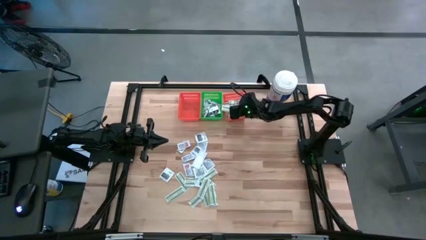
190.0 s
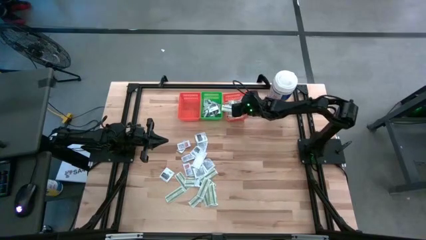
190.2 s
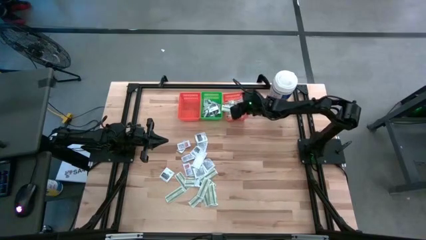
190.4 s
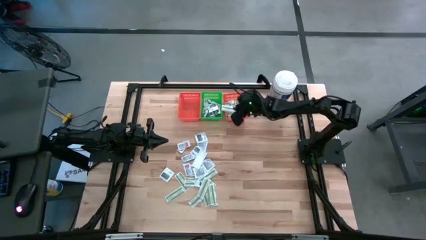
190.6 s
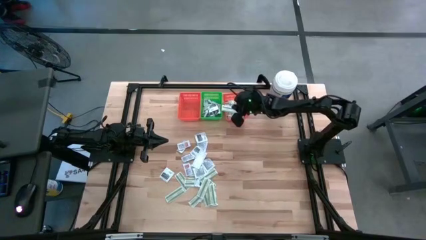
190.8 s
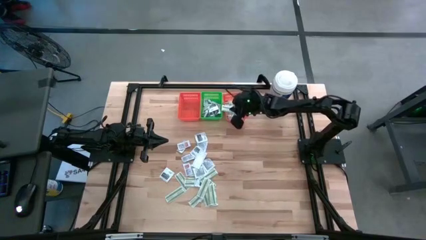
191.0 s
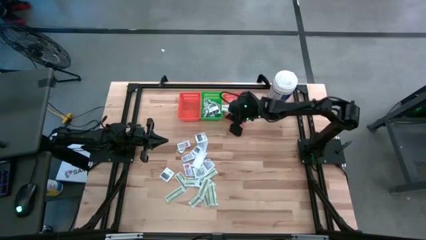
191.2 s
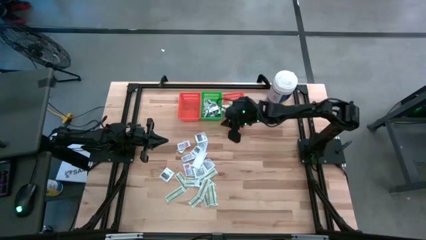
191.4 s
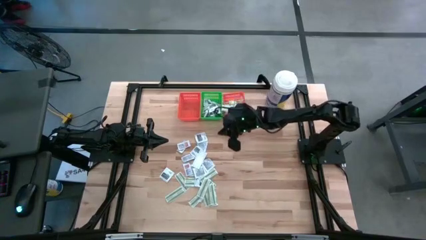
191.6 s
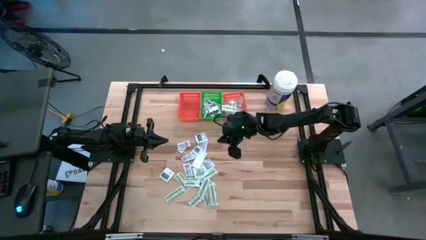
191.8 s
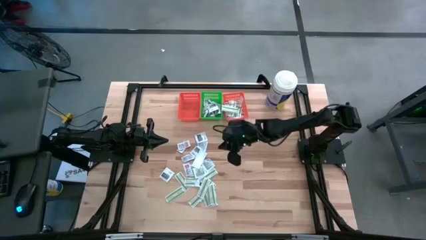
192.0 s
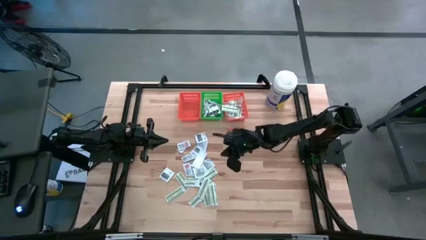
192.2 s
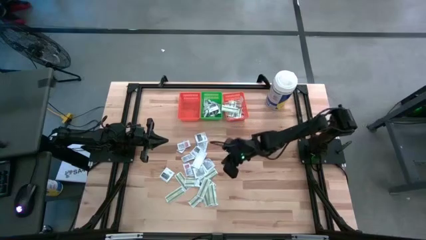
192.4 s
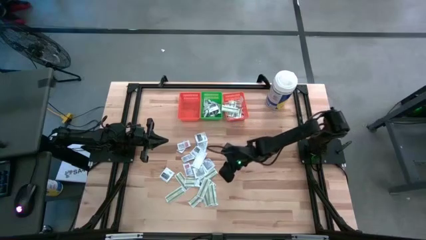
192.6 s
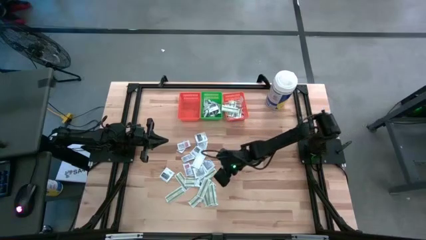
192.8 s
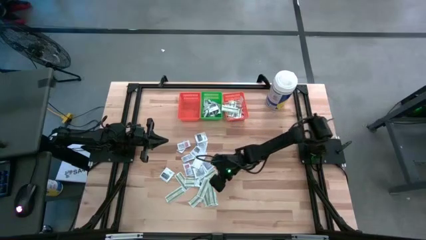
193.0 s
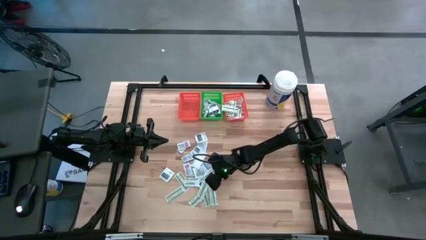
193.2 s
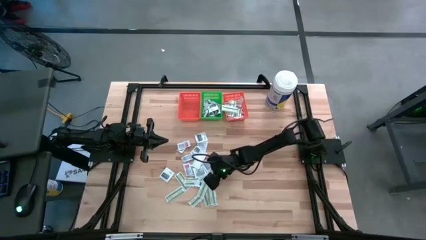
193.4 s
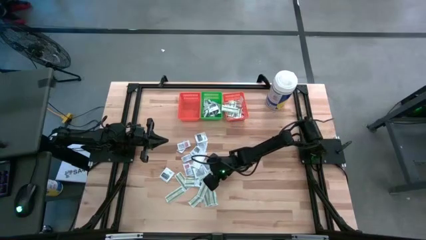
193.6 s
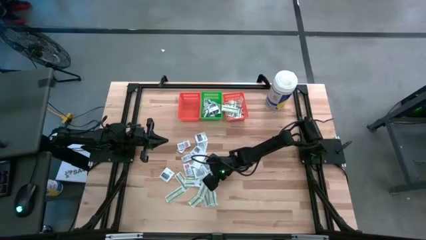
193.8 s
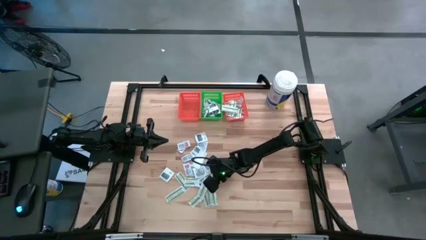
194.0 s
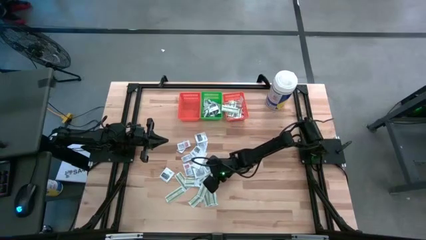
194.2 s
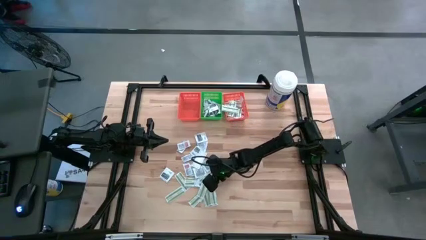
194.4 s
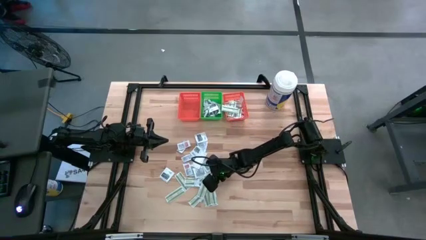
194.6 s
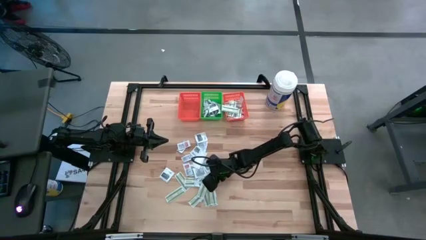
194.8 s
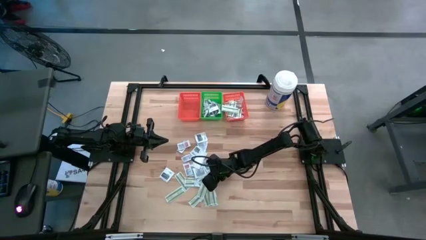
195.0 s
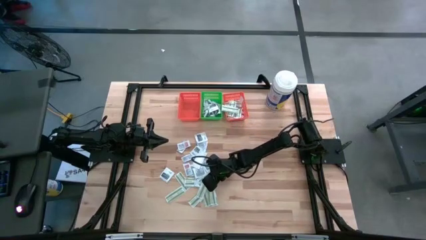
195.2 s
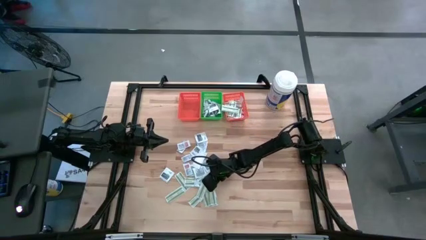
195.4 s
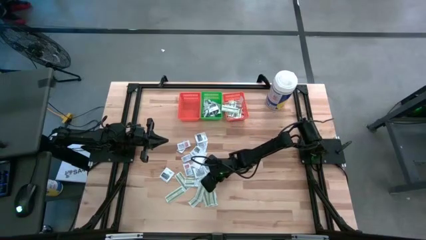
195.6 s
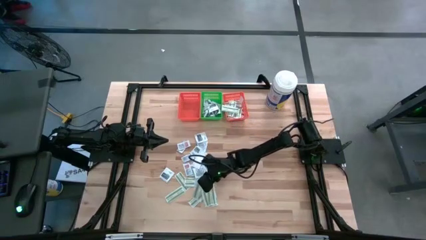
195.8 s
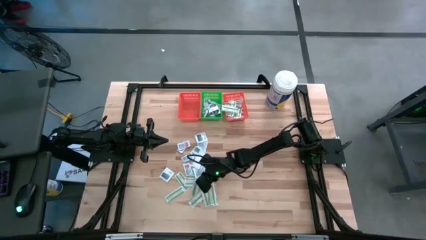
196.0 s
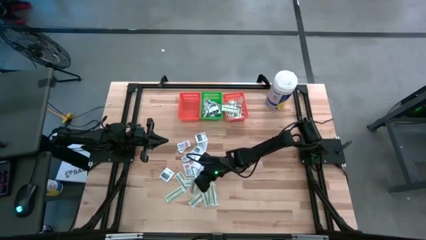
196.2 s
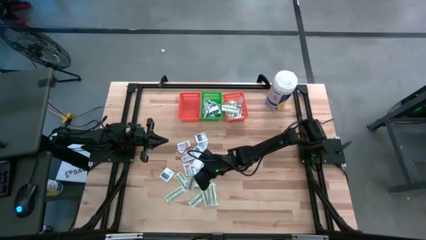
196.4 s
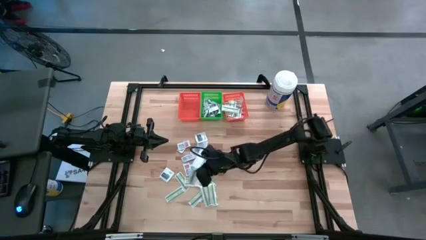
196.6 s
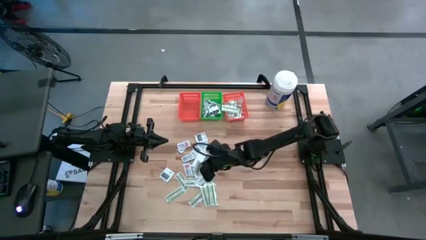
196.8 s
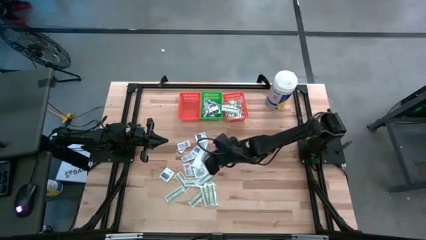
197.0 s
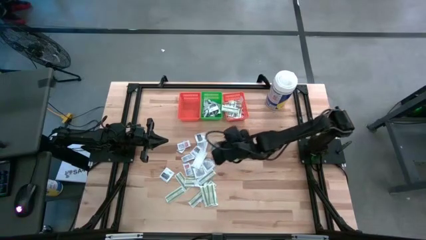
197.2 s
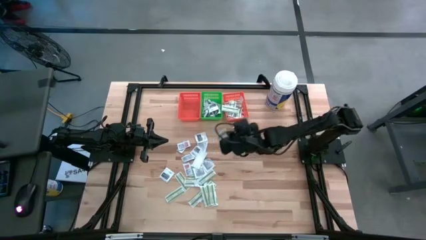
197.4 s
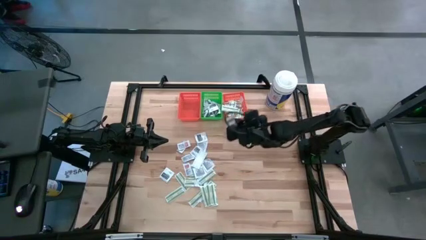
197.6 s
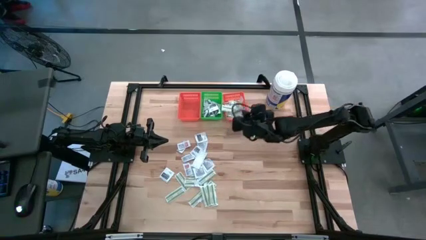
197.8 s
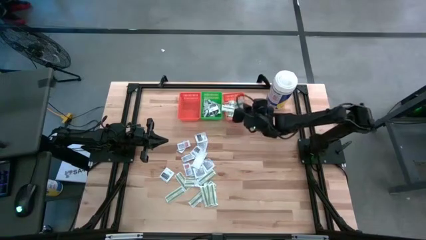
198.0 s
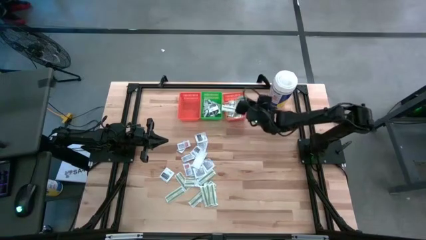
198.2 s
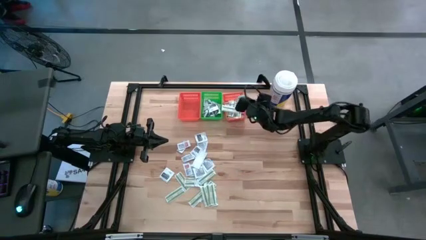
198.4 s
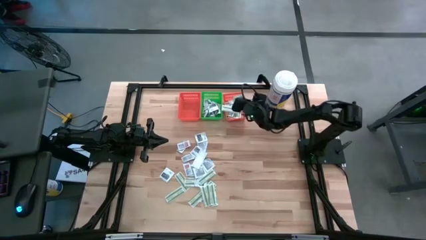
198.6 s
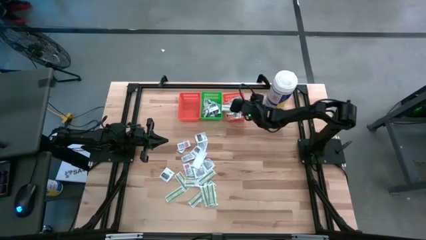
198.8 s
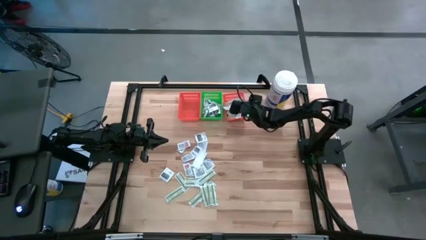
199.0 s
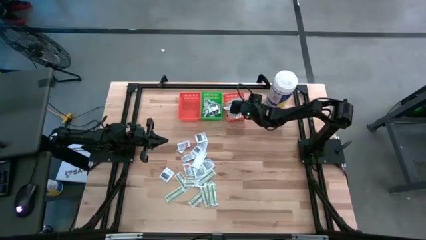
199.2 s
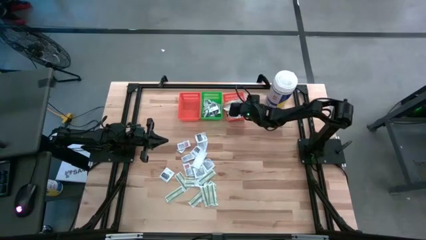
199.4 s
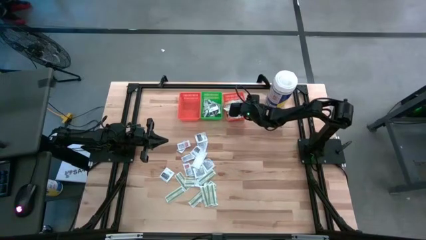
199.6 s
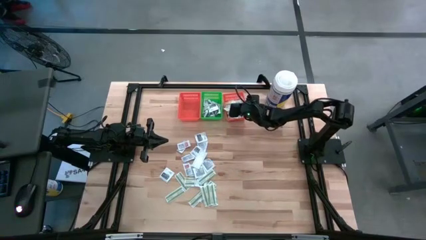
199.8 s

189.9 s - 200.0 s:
Task: Pick & Place First Aid Supplies
Put the bandage pack into the right orange bin
